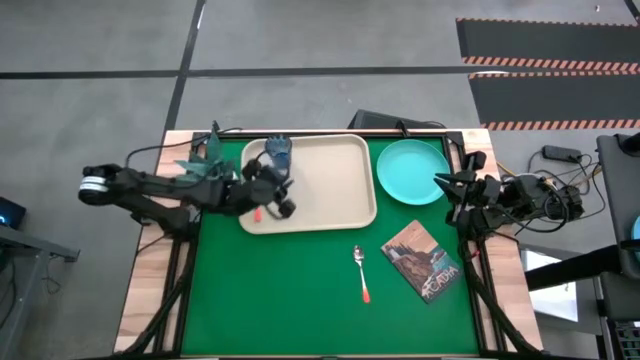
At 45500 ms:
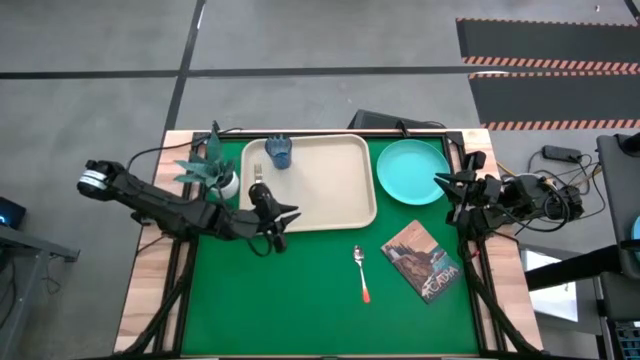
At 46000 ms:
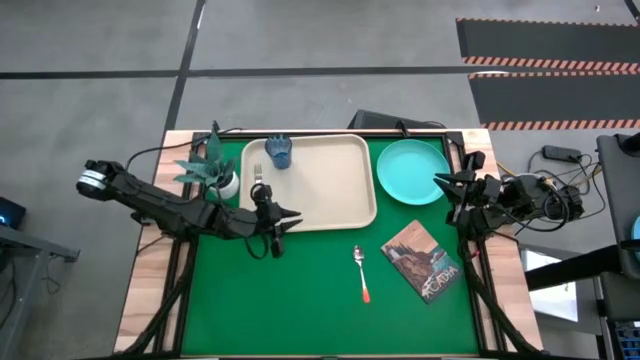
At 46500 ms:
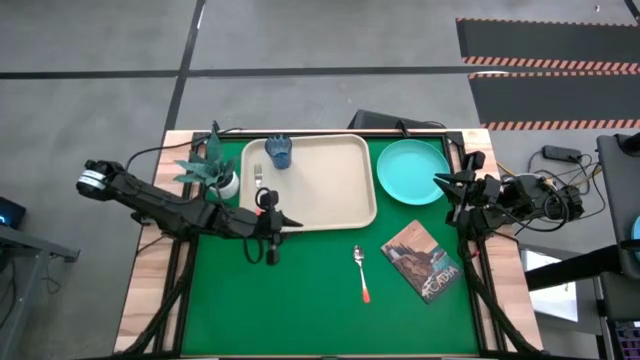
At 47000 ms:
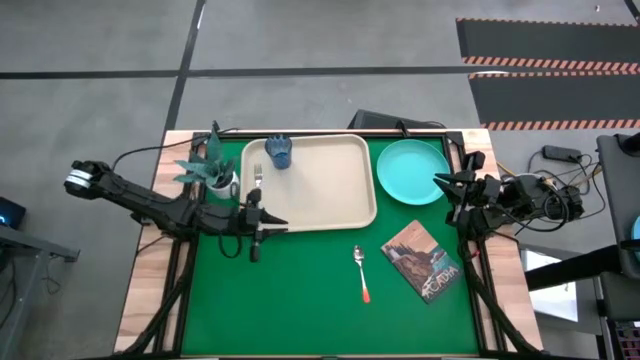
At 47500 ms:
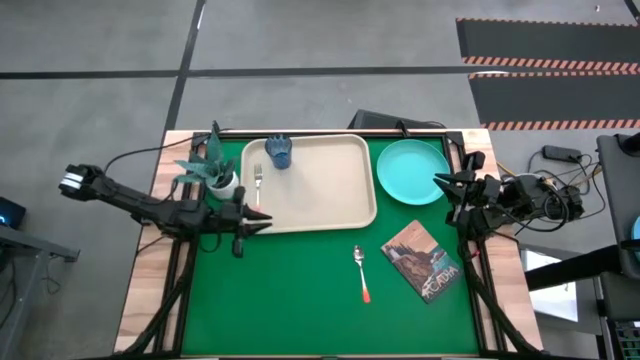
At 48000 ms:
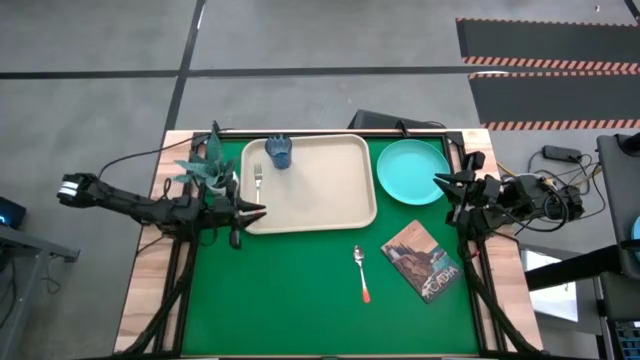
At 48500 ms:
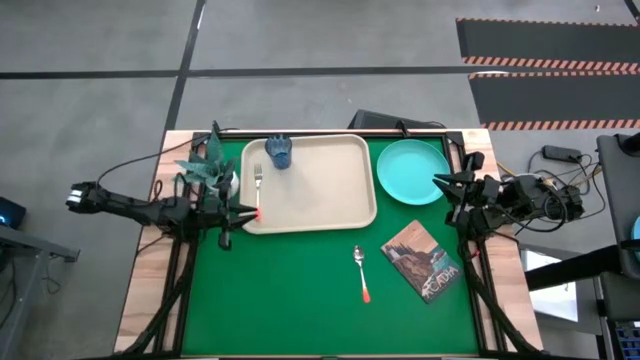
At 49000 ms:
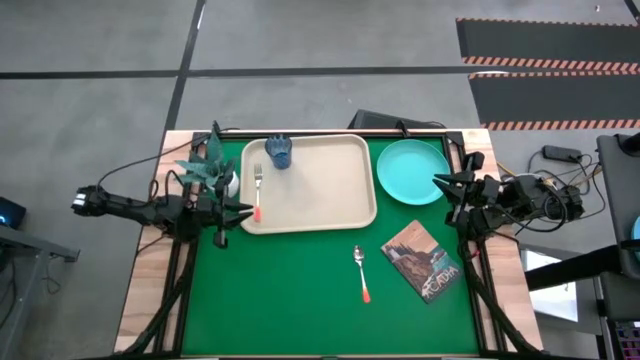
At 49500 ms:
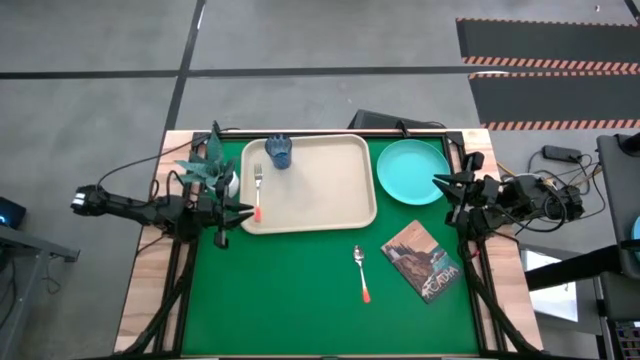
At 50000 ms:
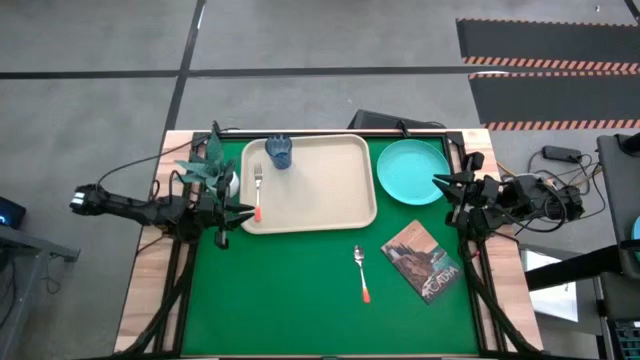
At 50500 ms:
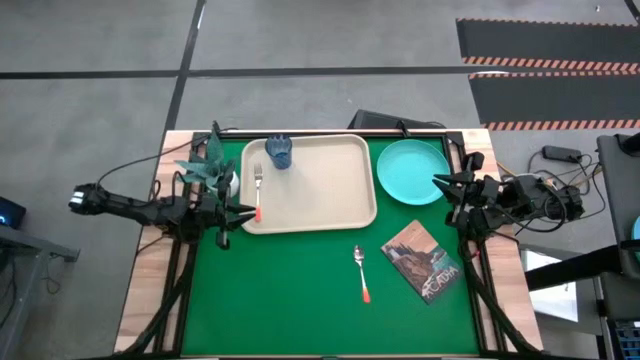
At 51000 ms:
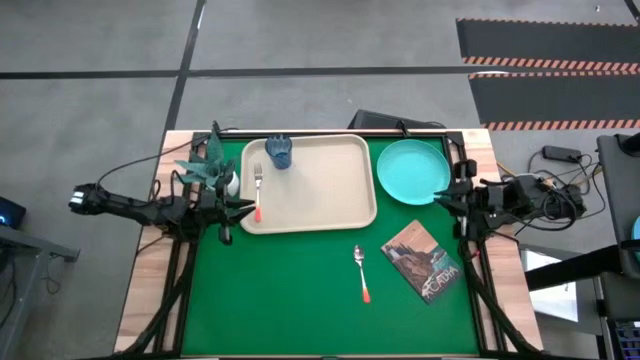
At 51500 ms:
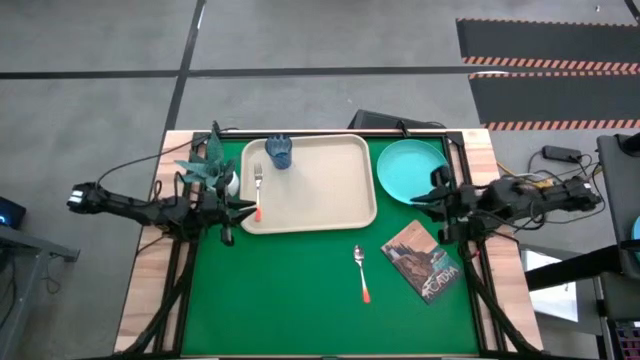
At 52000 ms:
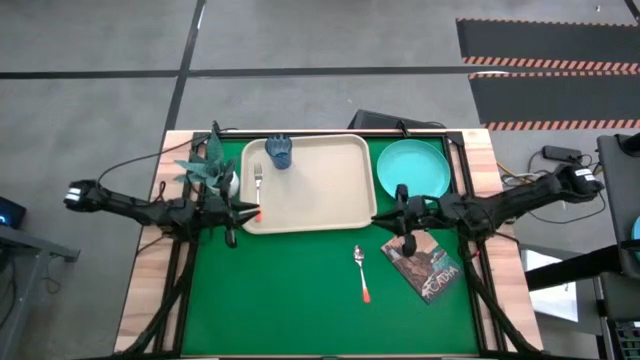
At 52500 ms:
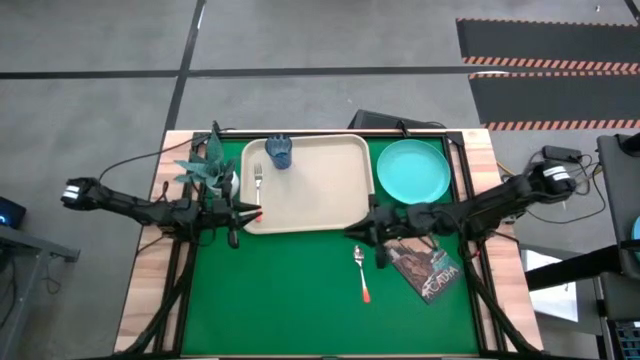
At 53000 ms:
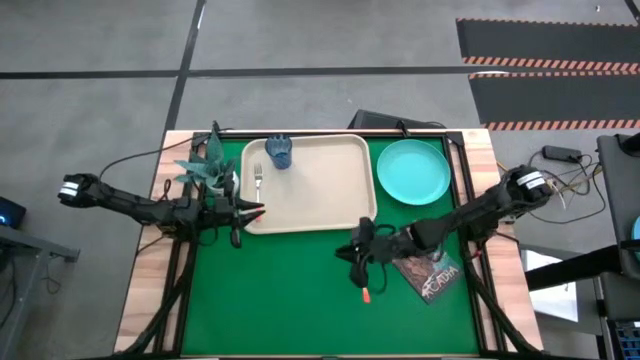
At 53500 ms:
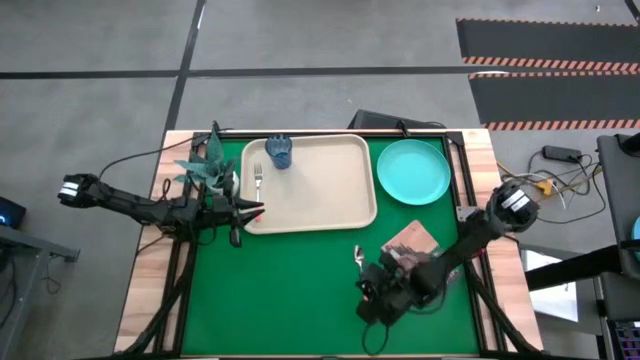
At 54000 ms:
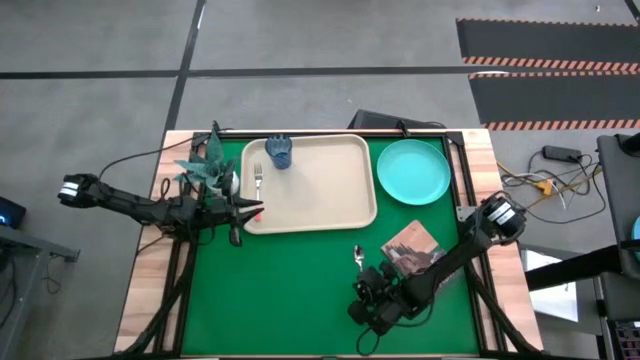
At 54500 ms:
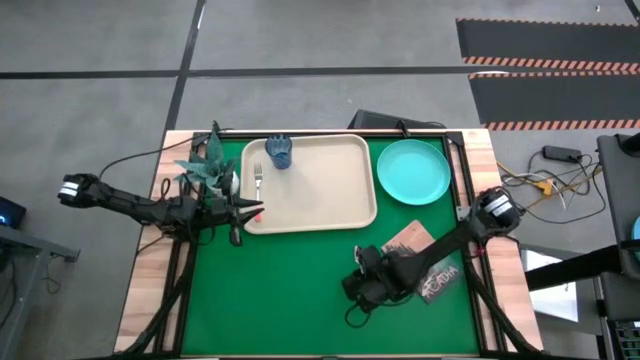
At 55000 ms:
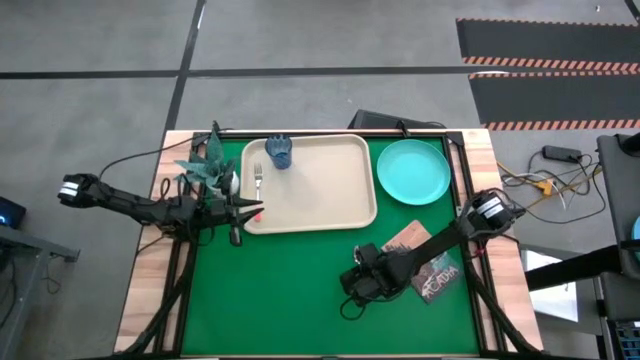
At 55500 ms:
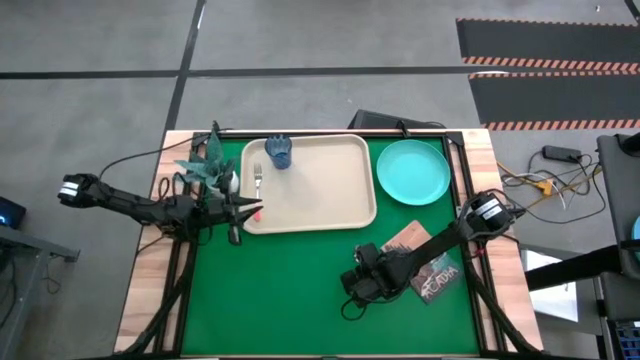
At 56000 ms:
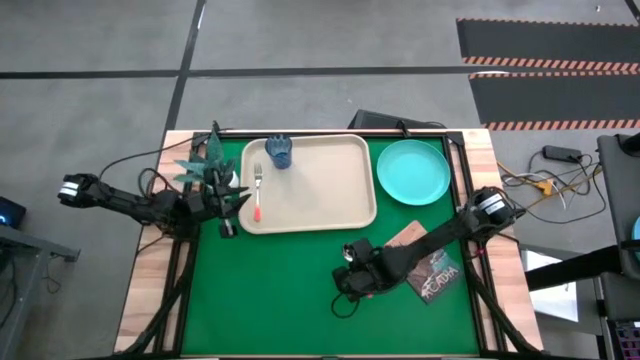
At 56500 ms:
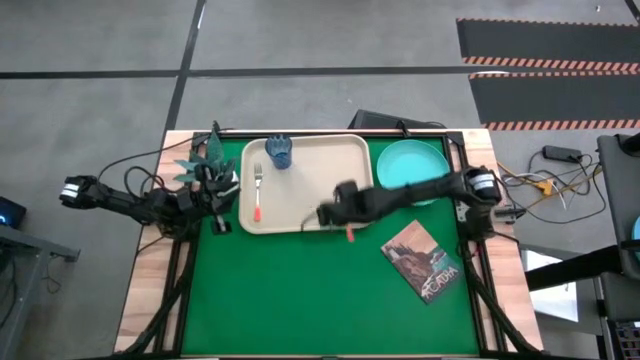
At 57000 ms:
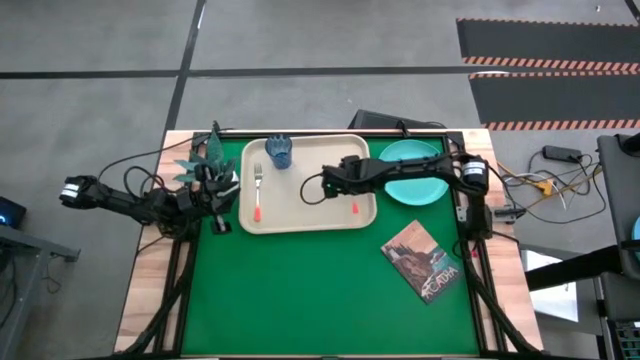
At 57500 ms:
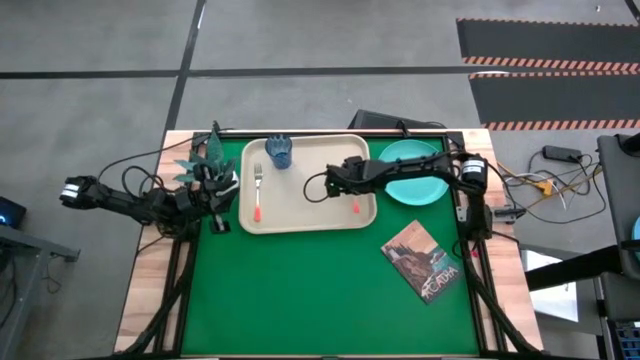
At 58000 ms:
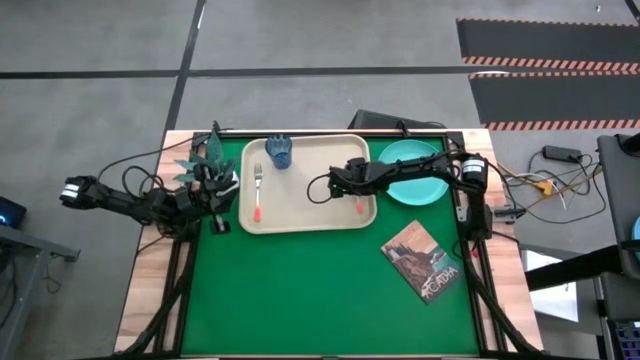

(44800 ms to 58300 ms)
Task: Pick and place plate/cup/fork/spoon on tray
Put the orange spoon on the white tray

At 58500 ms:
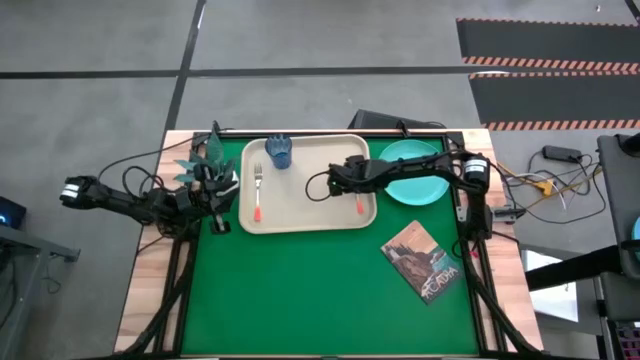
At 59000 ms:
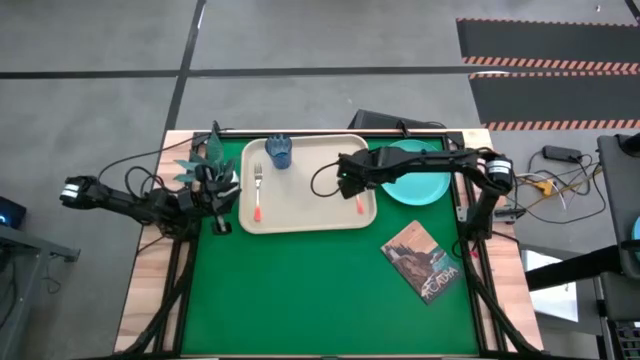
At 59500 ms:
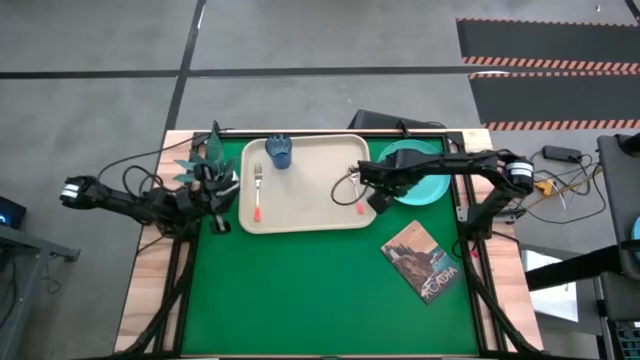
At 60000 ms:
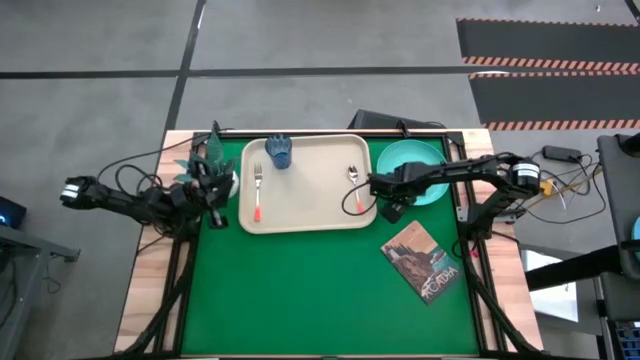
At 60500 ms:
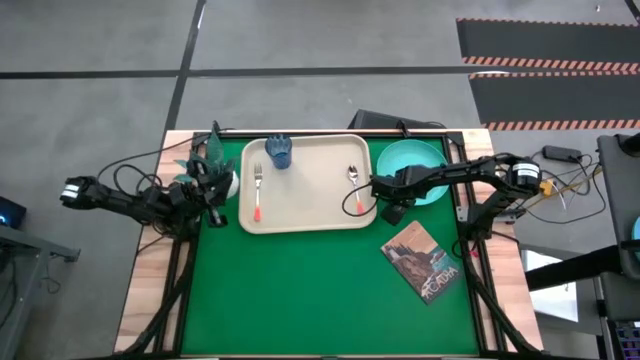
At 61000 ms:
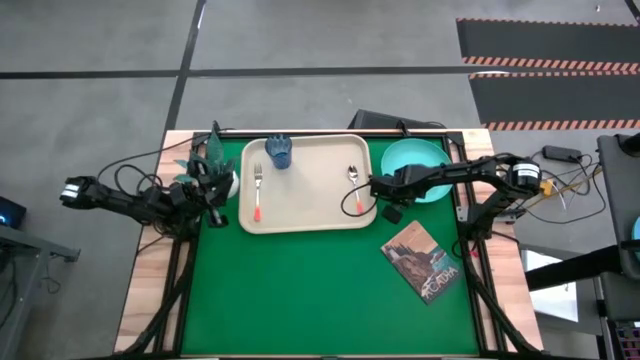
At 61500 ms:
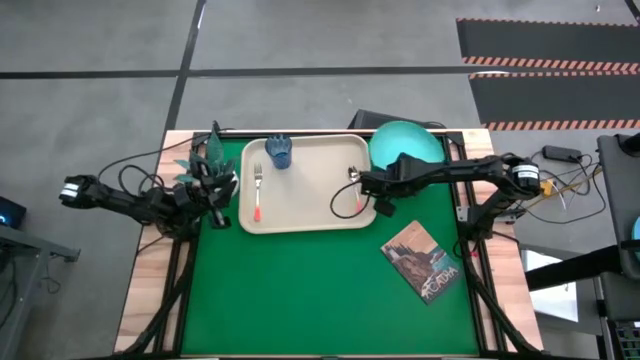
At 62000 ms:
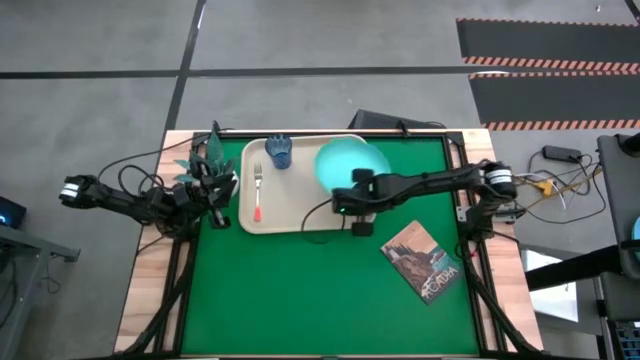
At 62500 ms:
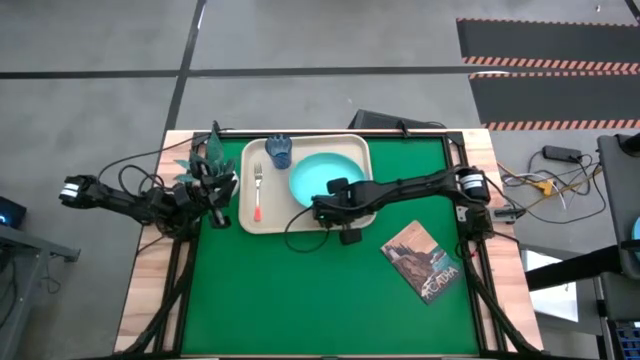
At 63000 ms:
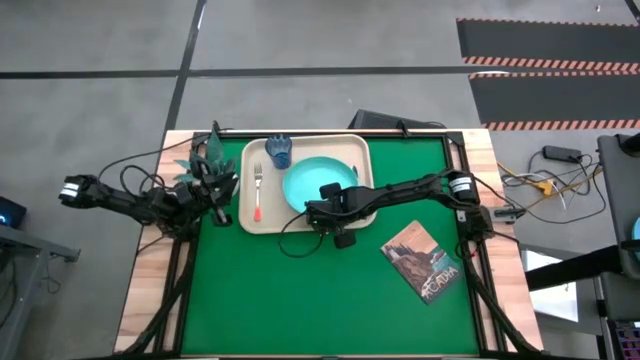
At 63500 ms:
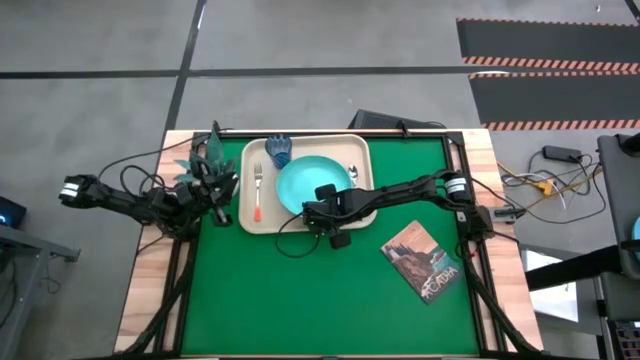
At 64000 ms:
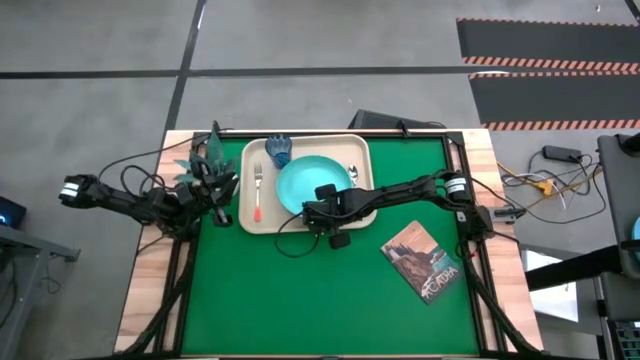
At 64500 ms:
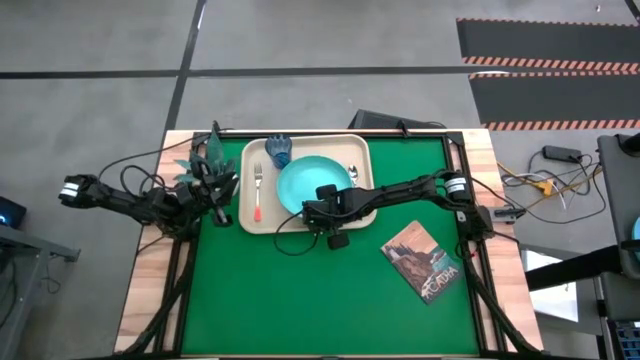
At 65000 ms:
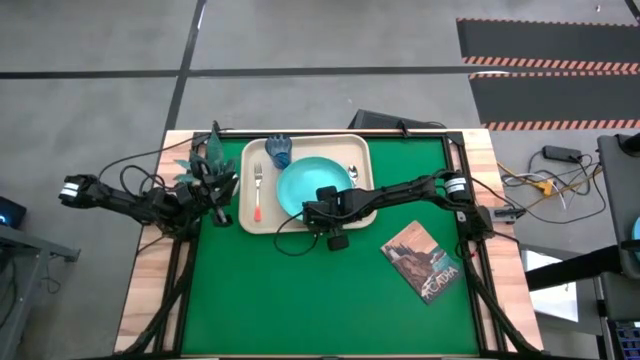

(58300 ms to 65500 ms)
Put the blue plate on the white tray
